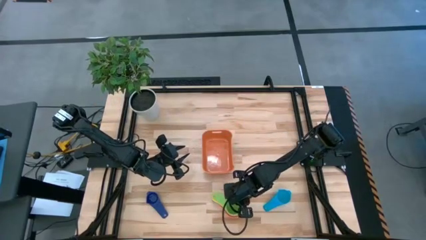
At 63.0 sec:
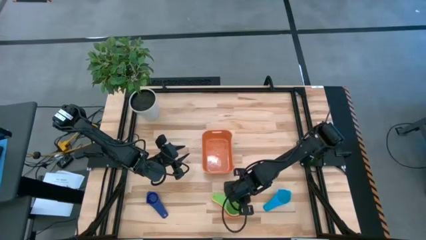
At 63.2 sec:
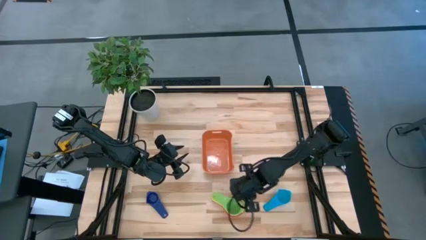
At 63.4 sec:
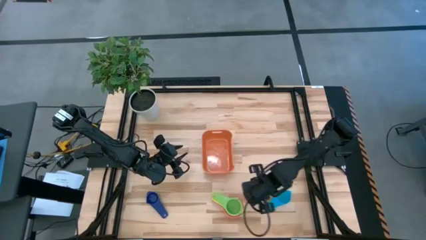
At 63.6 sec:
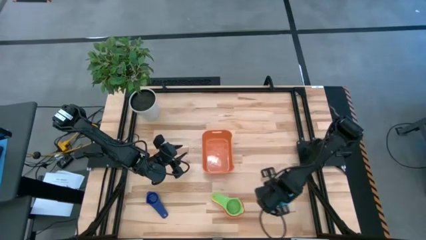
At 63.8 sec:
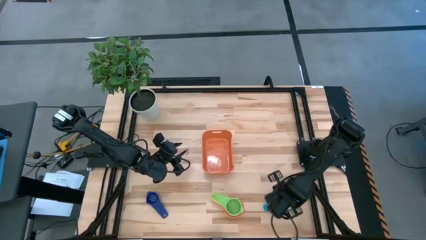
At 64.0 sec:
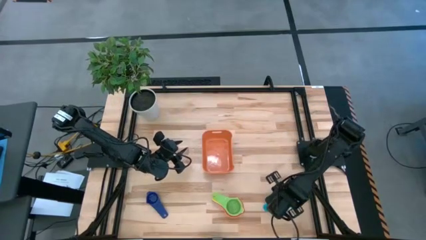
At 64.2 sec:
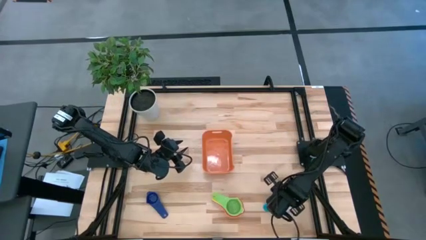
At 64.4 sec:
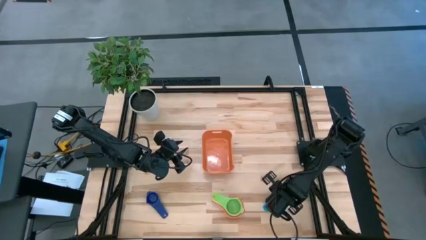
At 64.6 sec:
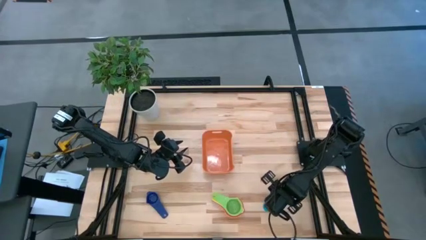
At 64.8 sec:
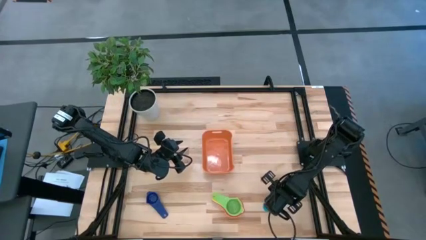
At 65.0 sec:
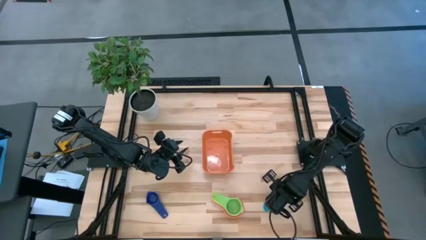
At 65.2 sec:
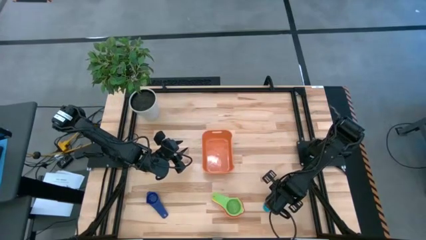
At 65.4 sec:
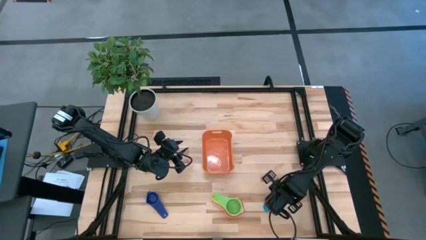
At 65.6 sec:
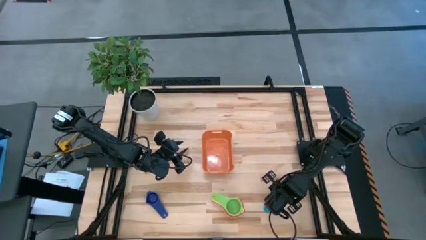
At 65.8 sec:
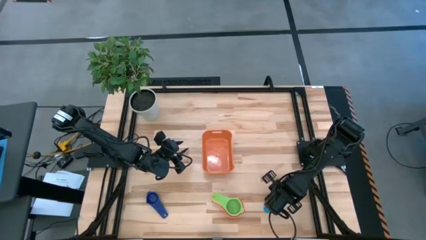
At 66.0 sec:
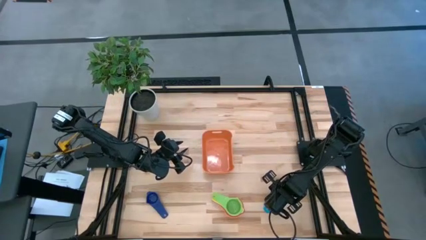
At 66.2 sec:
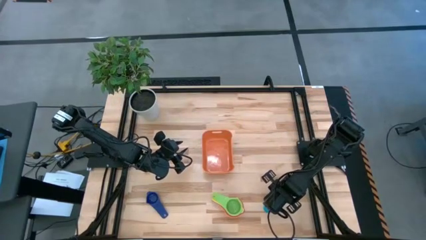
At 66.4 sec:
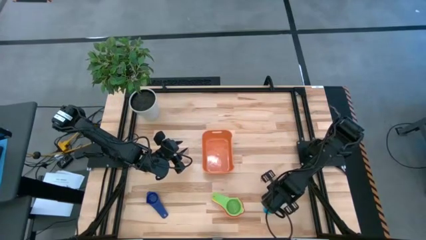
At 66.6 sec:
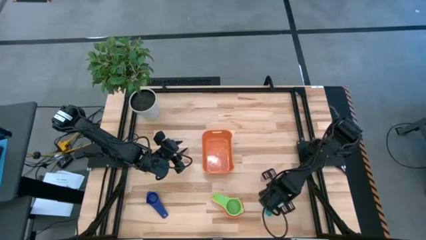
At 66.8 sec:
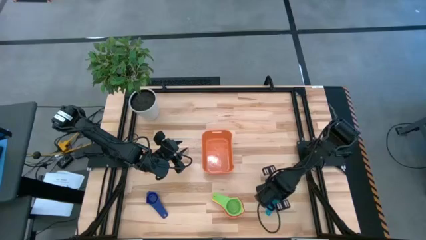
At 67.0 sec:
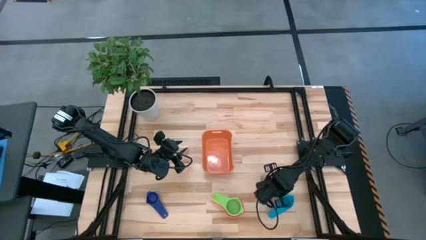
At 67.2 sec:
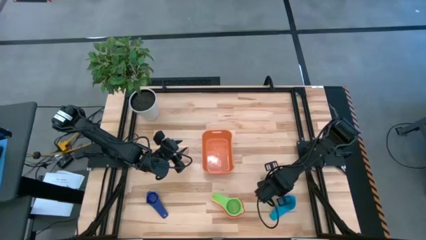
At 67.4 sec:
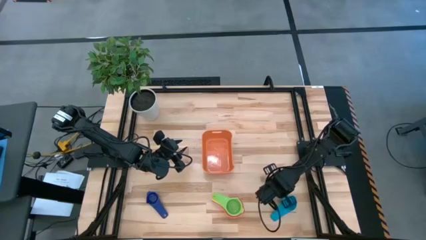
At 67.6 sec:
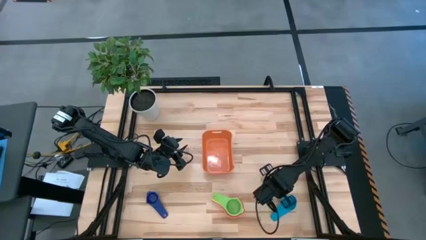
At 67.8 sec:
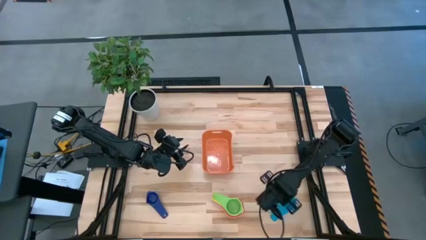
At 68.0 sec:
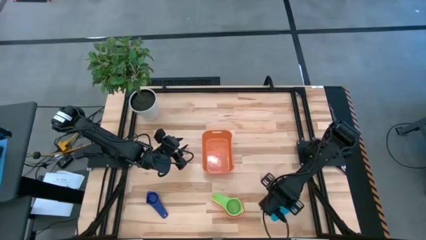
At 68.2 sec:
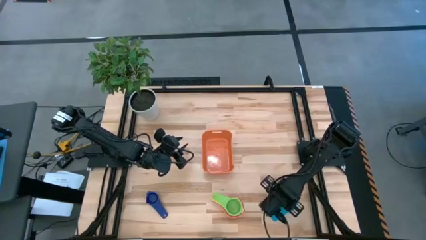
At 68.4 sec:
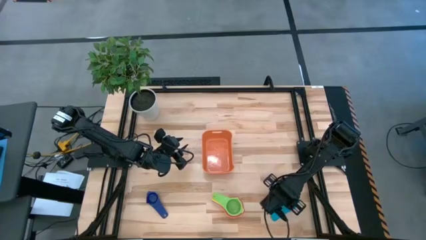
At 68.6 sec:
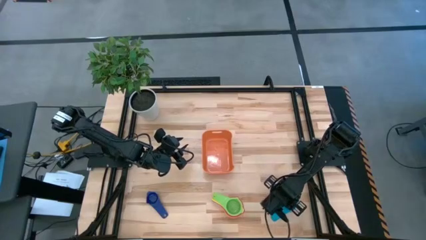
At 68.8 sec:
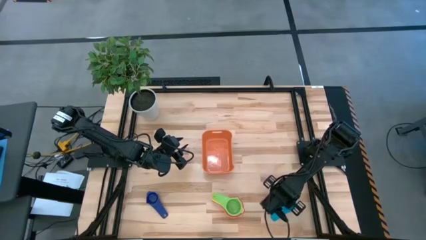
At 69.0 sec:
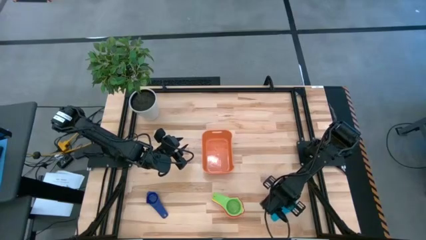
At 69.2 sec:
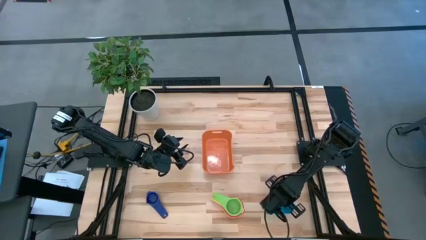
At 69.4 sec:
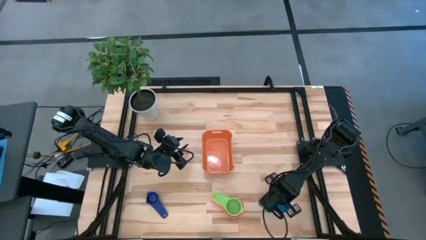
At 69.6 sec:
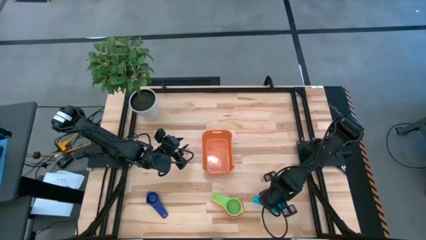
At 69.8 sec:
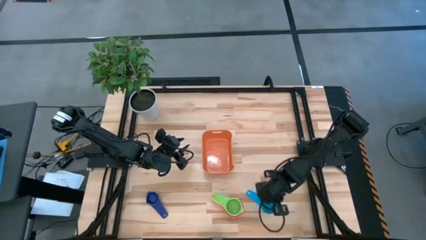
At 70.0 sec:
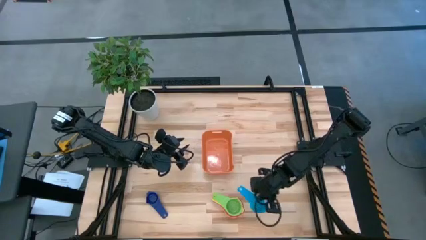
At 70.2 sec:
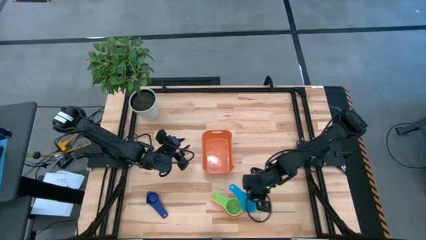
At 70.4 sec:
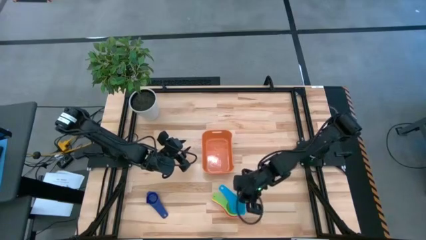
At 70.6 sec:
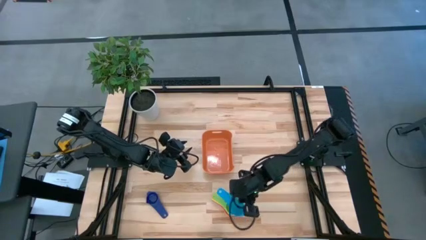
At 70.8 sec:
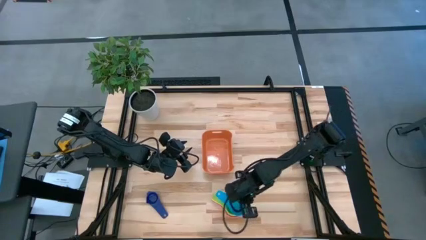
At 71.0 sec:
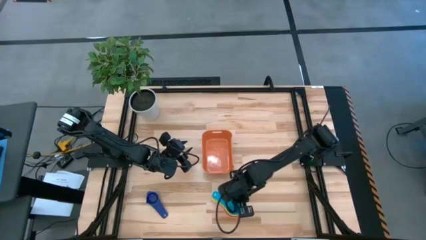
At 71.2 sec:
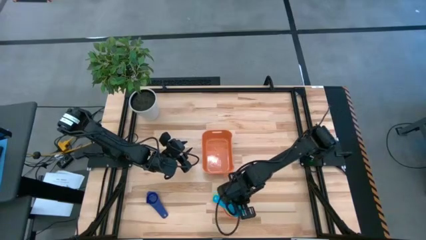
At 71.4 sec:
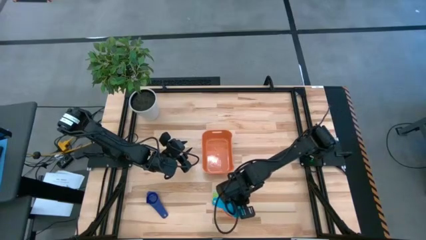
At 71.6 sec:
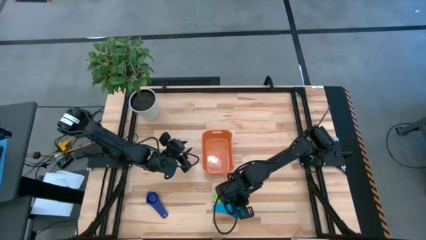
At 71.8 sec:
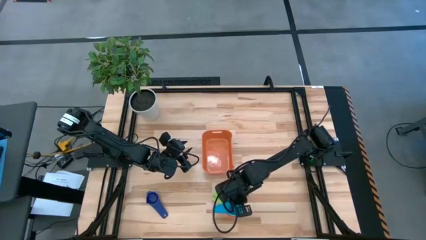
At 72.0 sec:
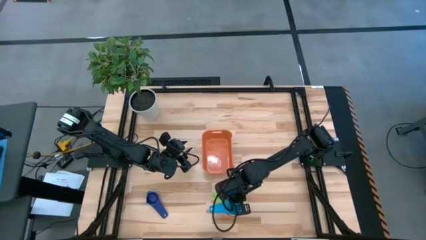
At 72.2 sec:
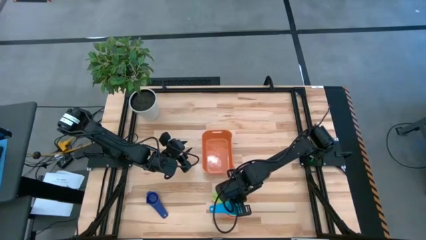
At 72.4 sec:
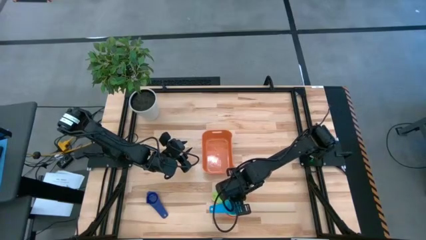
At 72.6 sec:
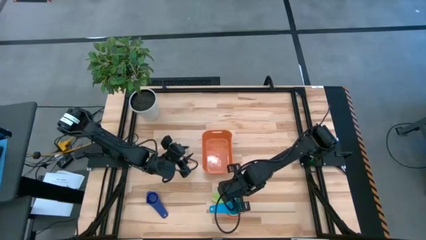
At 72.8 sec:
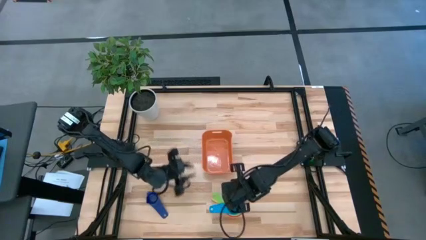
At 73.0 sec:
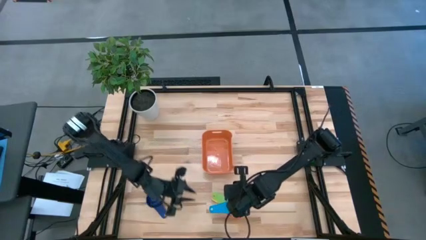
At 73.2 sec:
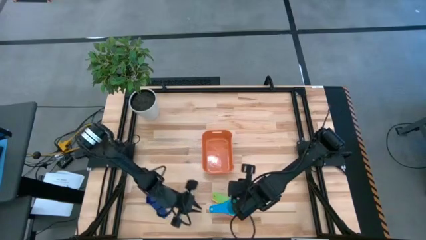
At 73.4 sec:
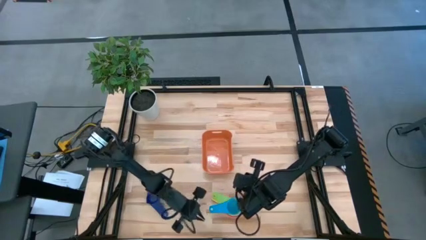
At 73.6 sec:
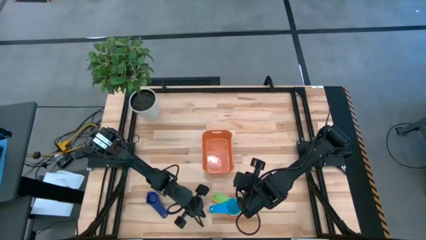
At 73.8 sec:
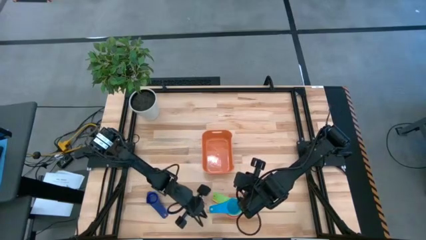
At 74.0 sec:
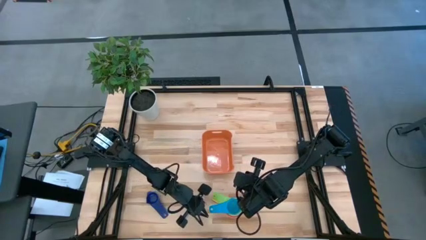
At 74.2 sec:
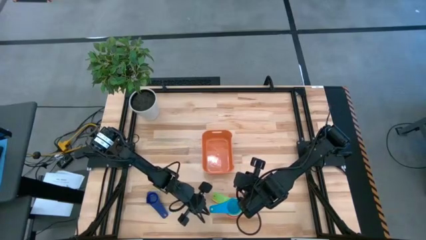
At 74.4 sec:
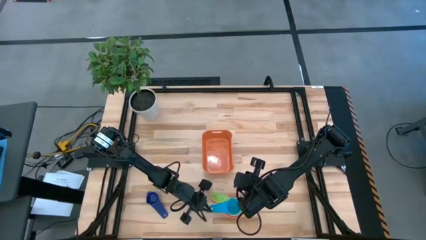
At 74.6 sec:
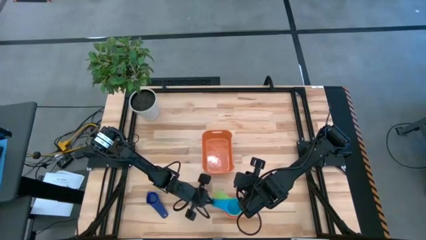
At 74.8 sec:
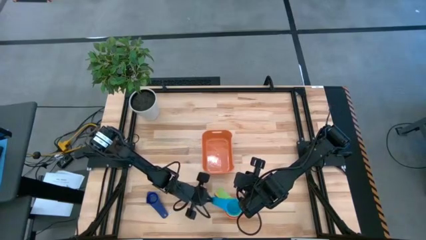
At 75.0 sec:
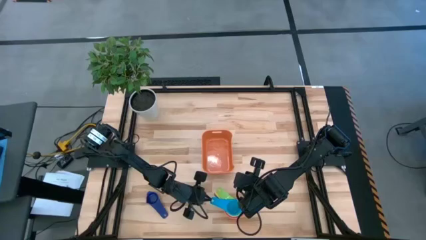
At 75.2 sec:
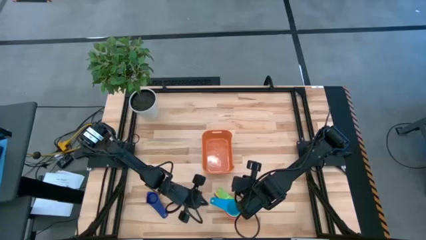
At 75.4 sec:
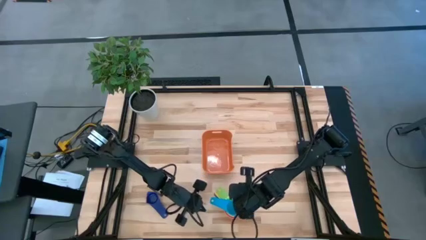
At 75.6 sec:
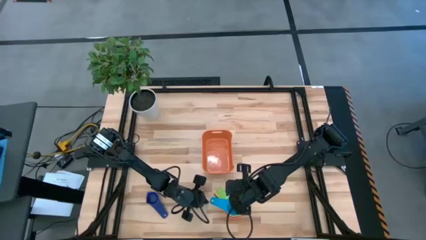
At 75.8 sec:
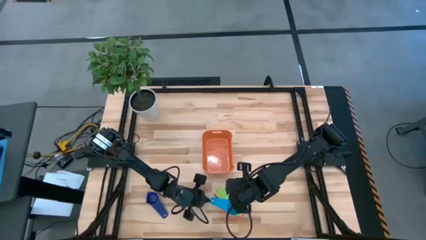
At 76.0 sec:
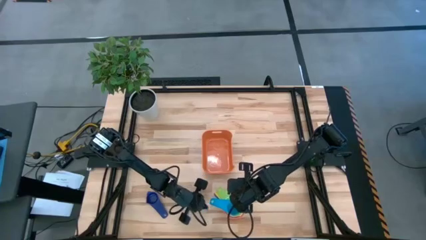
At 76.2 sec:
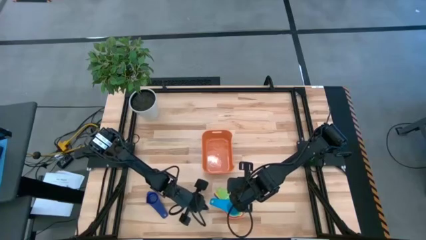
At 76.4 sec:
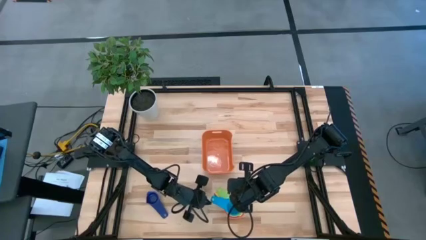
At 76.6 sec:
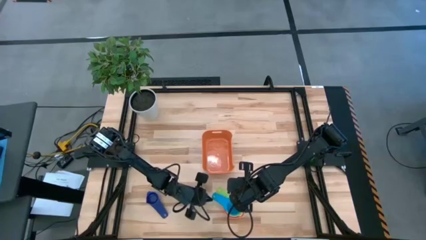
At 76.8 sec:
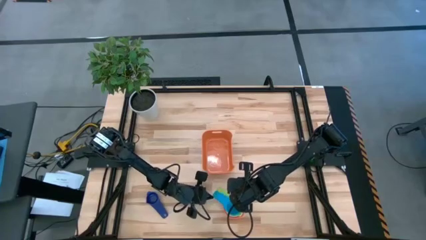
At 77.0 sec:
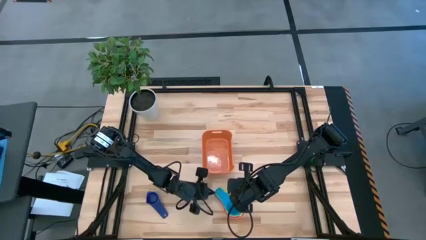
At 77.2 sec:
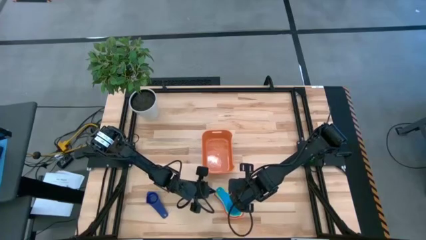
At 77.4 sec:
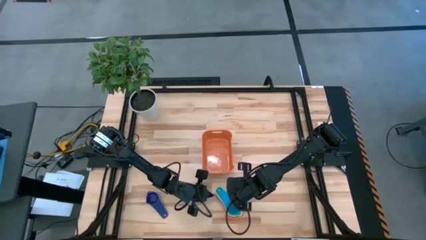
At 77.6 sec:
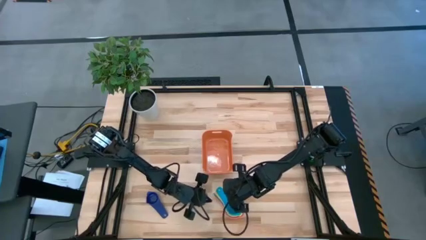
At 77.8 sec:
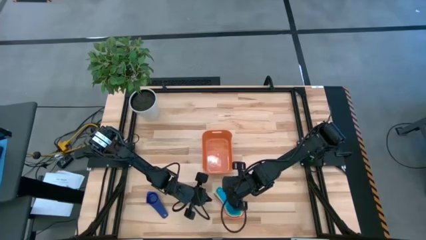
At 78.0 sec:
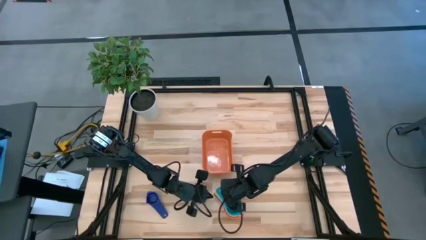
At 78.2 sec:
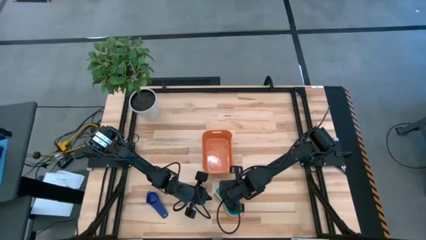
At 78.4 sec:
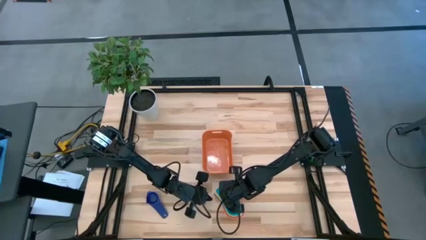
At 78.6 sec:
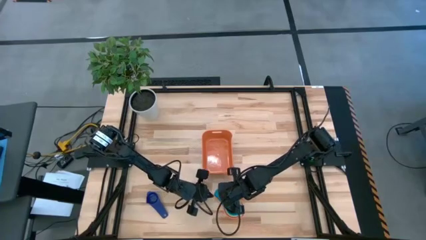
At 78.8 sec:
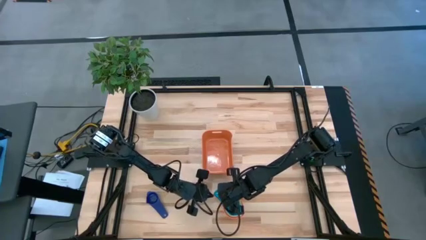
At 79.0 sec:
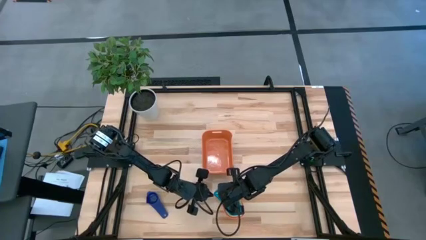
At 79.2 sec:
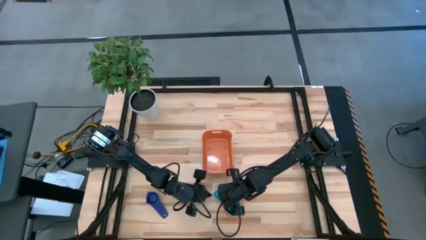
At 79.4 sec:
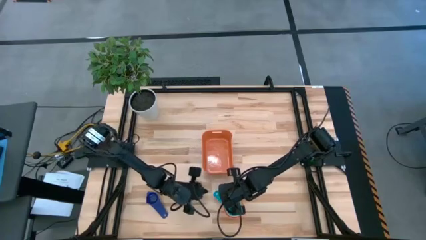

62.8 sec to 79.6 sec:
Task: Nest measuring cups in basket
Stack the light blue measuring cup on top of the green measuring cup
